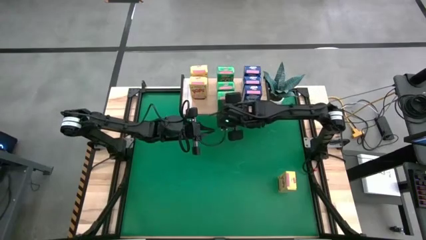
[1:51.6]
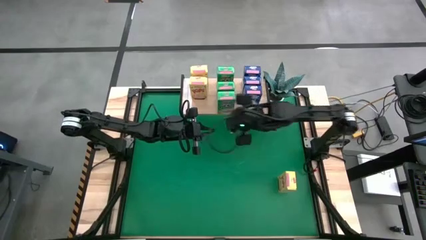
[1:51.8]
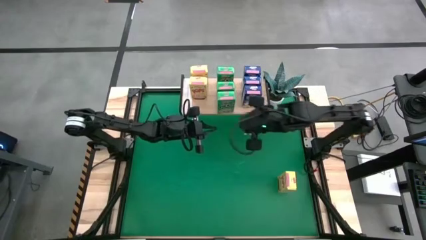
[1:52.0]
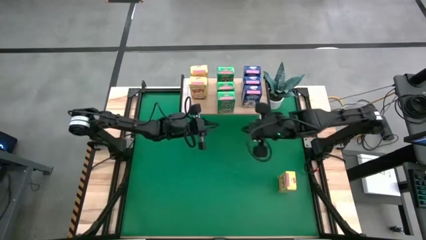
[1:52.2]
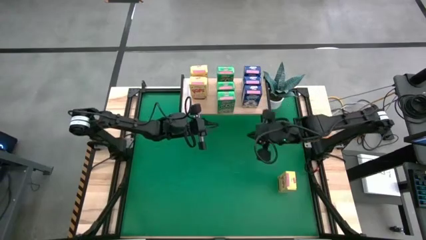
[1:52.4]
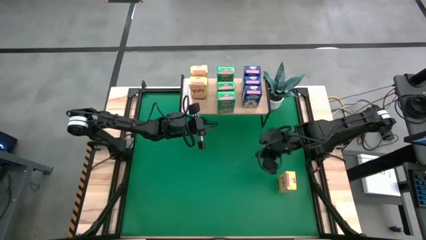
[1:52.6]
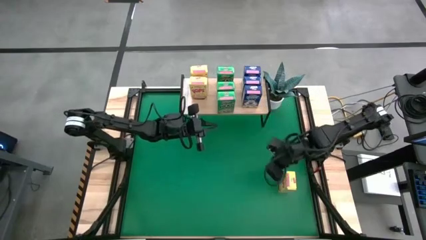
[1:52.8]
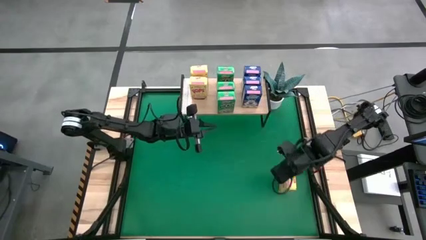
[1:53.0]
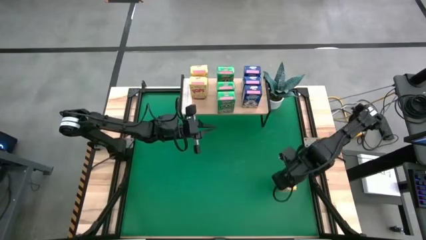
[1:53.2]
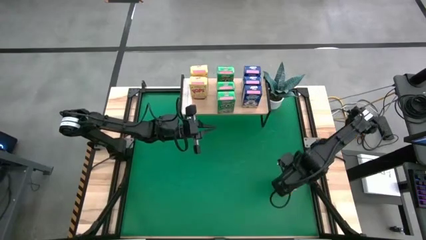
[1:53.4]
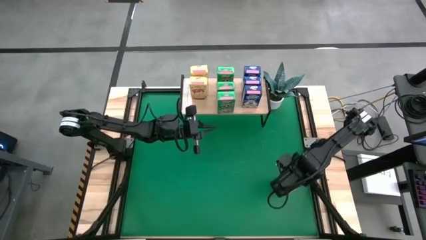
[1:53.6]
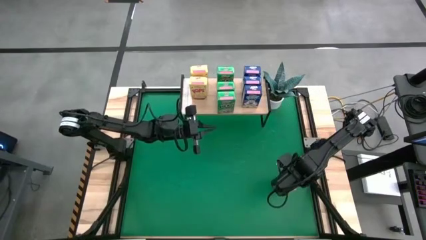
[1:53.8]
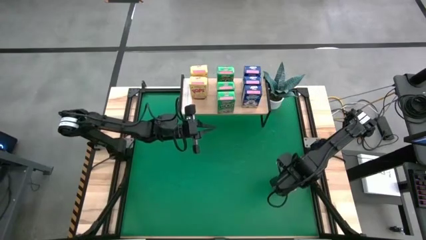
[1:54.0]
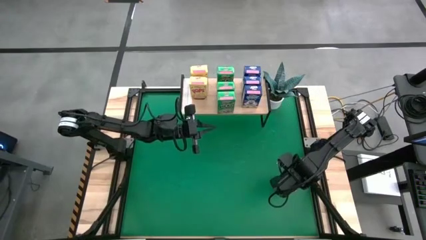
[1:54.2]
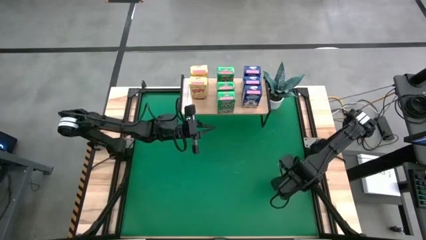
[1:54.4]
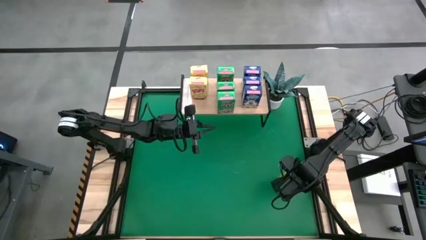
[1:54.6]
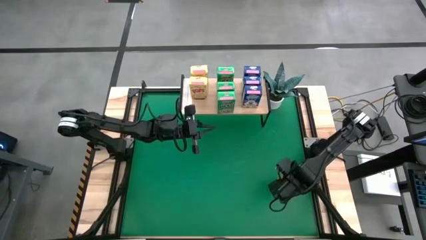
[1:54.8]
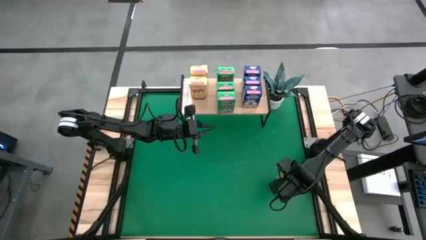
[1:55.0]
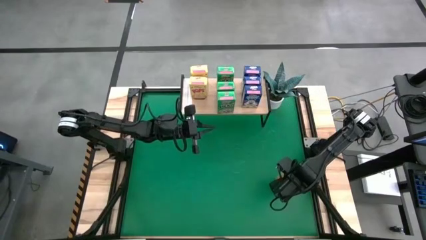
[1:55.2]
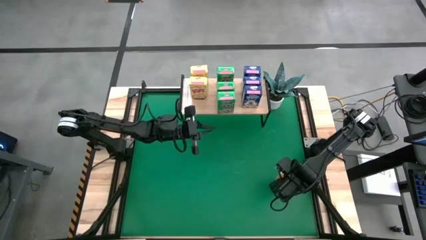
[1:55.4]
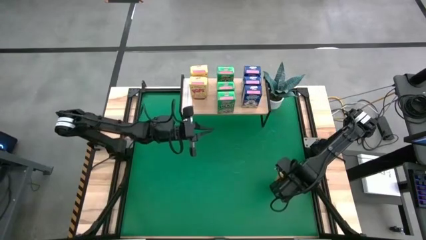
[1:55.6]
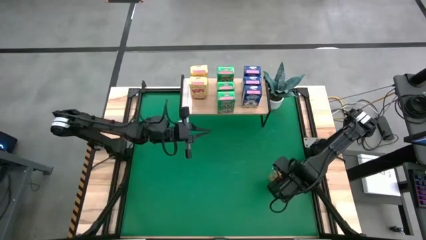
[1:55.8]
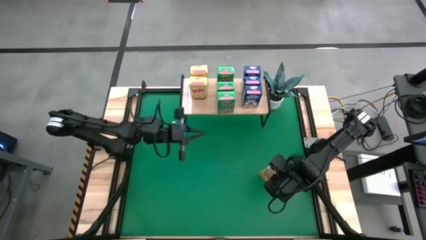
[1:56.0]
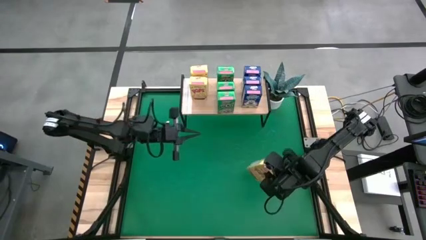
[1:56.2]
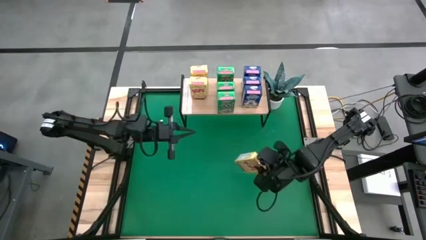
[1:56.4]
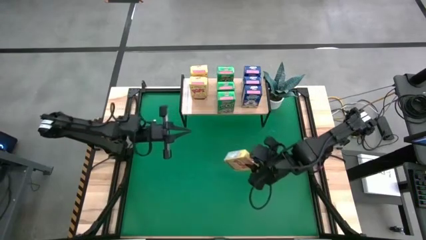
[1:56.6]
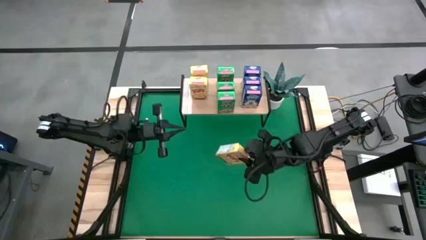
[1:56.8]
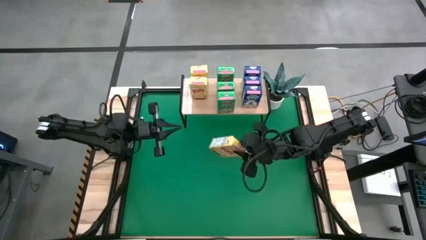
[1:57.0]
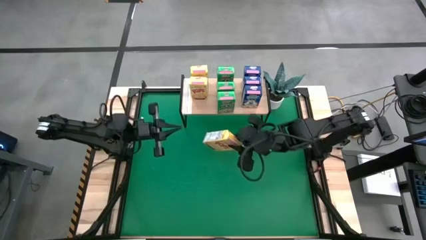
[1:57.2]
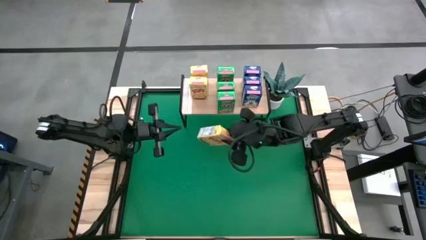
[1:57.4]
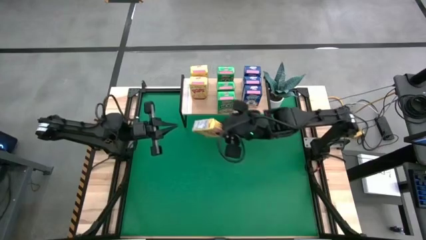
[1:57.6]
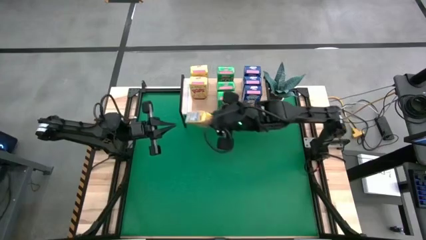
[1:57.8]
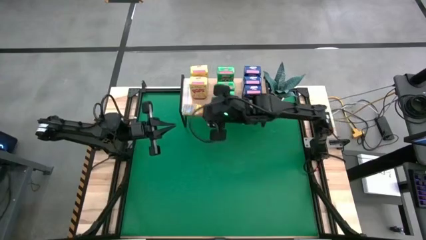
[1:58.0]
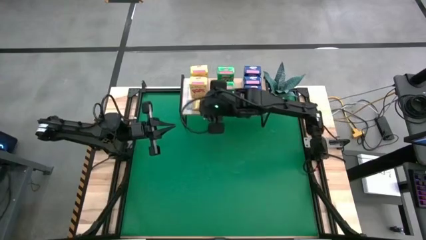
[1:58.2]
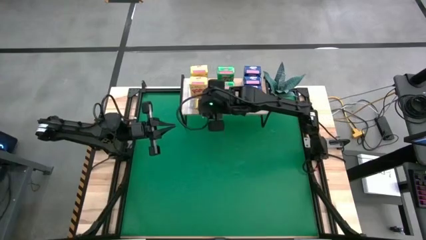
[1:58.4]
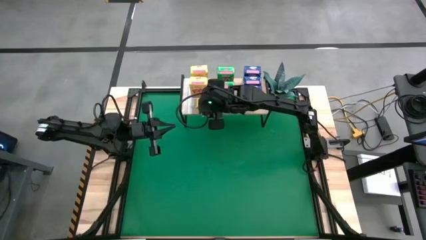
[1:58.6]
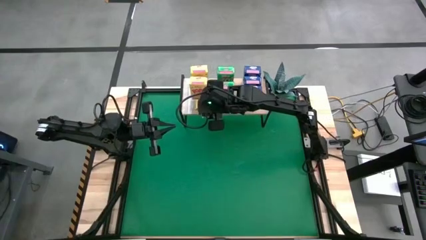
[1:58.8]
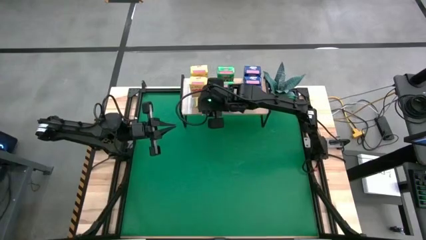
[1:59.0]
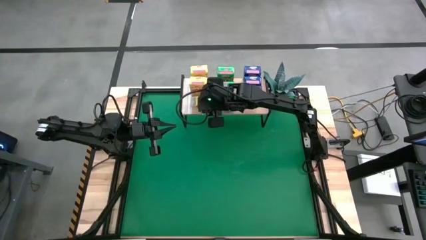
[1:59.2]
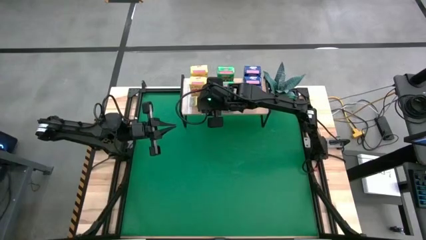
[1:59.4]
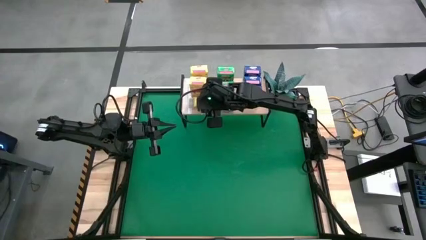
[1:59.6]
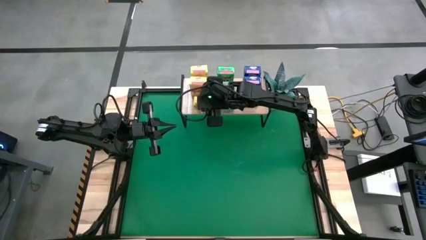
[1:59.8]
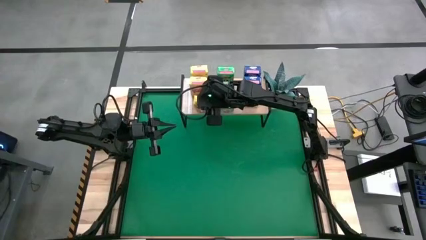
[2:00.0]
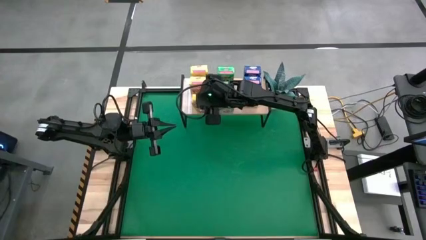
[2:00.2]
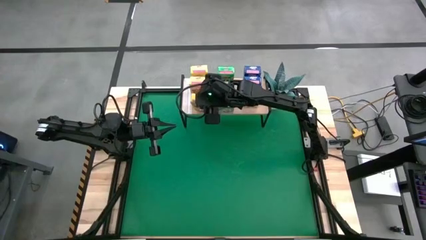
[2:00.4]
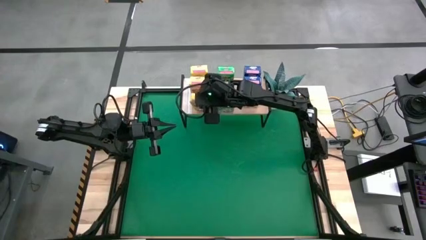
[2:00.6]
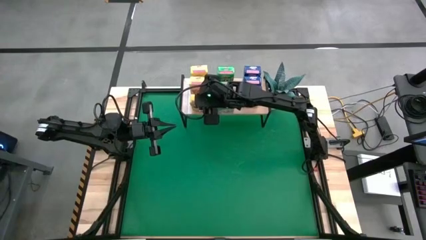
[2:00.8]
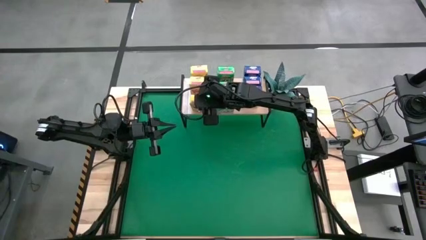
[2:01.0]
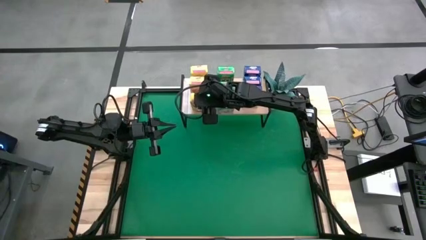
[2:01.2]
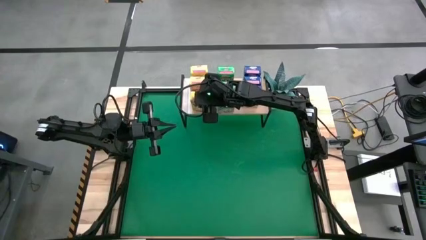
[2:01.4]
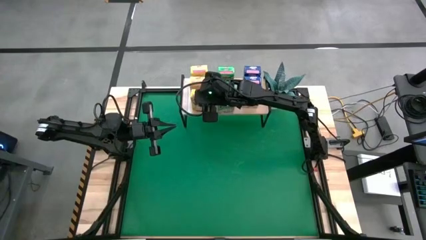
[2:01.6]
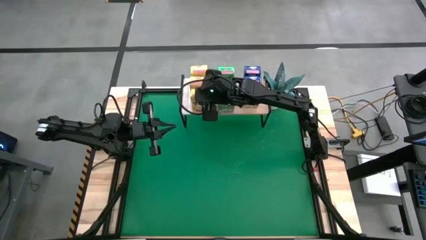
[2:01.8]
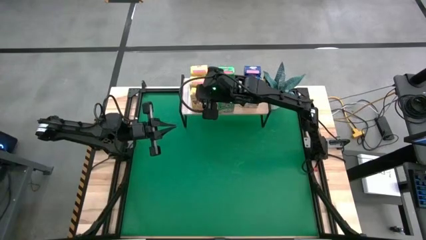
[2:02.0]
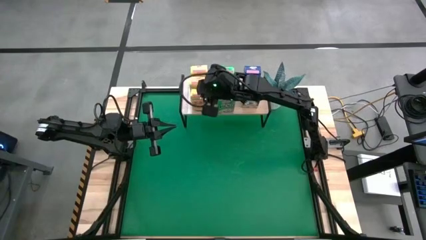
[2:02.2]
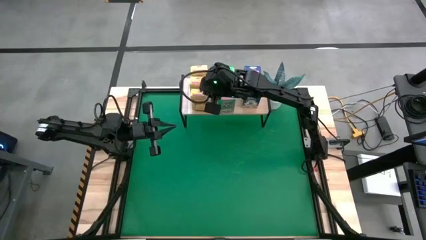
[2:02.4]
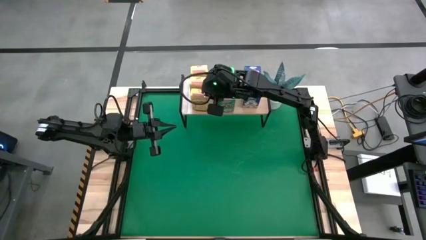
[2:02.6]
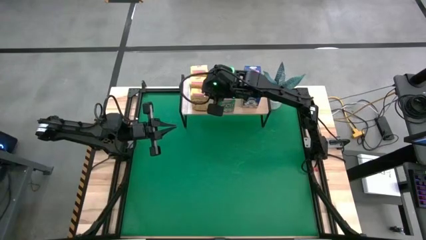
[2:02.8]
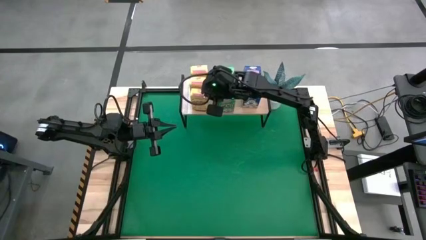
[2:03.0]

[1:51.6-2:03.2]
Task: Stack cereal on shelf
Put the yellow cereal box on the shelf aligned with the other yellow cereal boxes

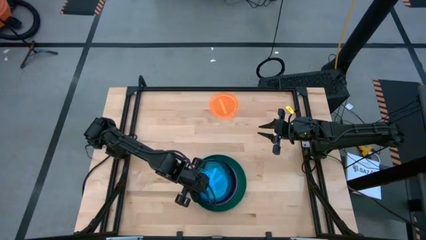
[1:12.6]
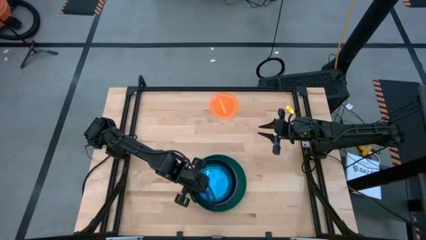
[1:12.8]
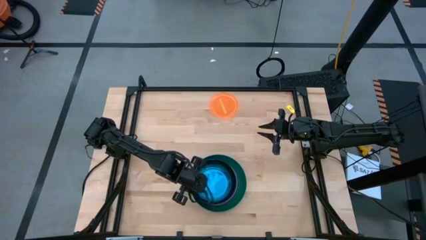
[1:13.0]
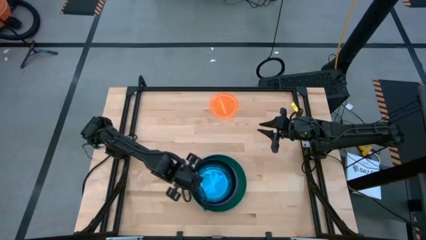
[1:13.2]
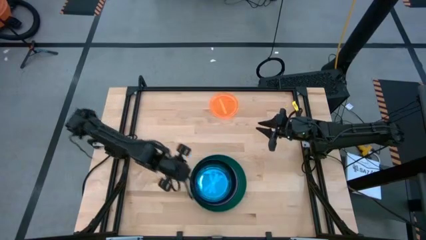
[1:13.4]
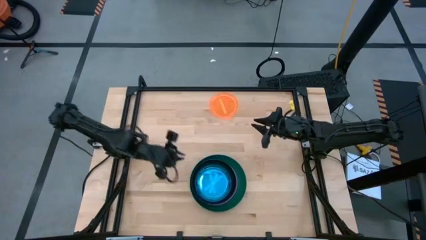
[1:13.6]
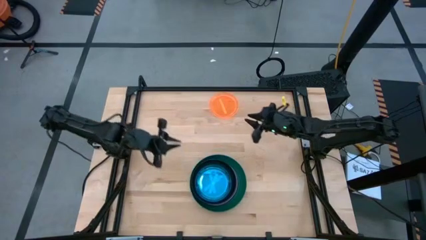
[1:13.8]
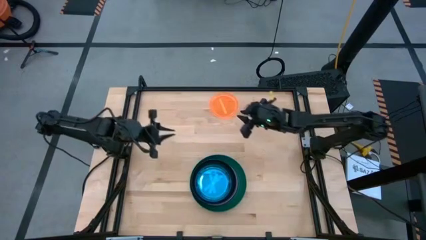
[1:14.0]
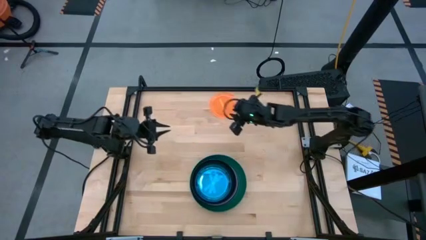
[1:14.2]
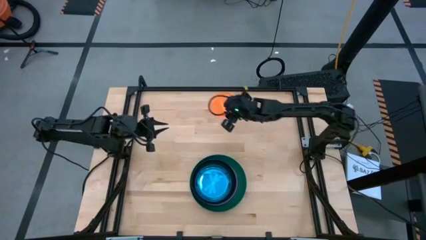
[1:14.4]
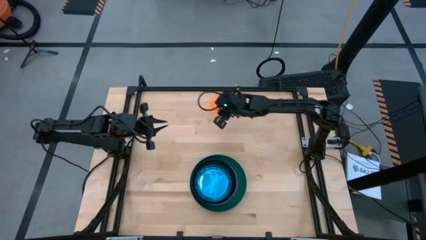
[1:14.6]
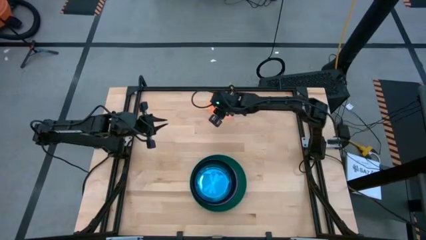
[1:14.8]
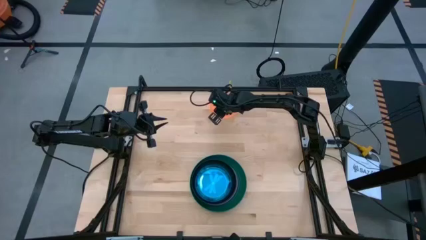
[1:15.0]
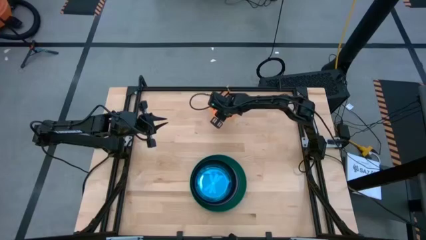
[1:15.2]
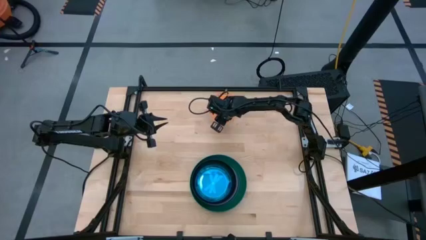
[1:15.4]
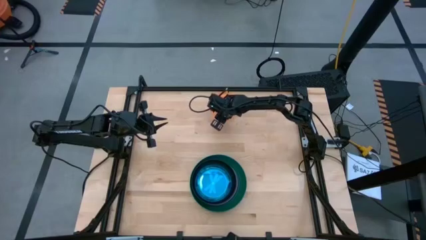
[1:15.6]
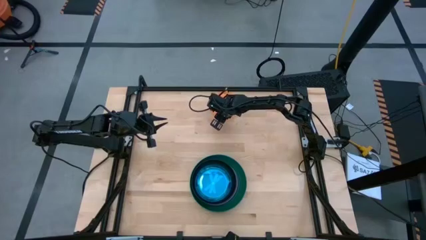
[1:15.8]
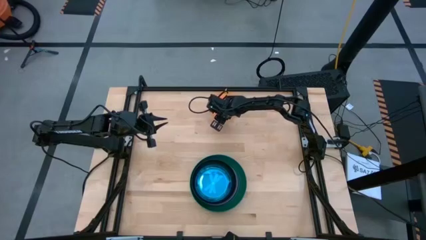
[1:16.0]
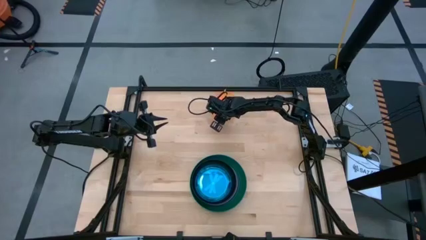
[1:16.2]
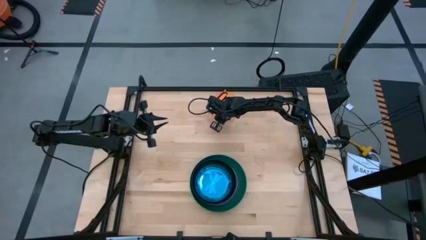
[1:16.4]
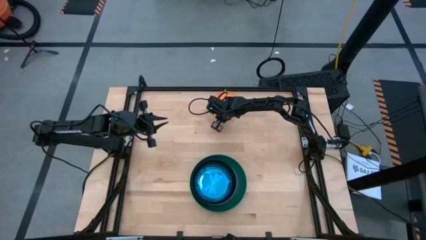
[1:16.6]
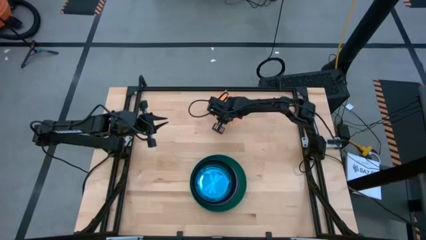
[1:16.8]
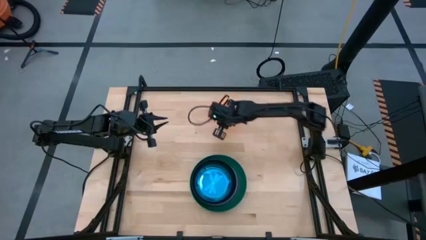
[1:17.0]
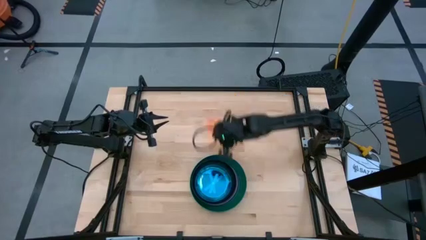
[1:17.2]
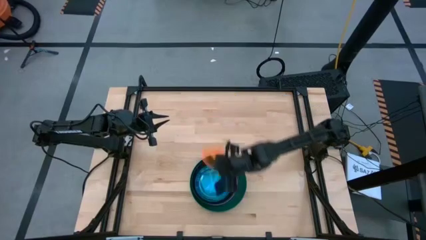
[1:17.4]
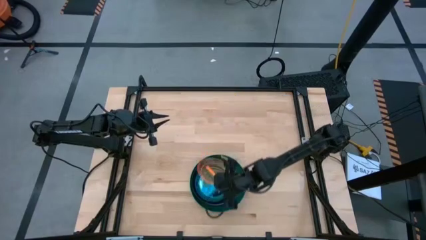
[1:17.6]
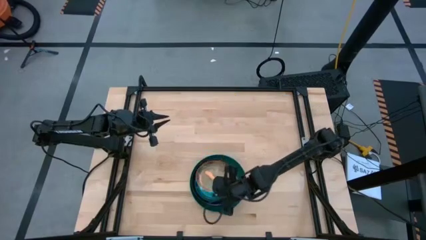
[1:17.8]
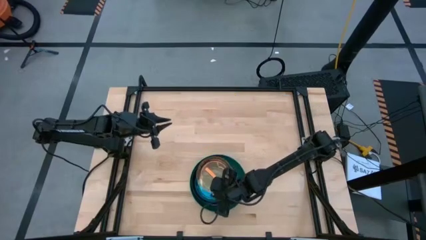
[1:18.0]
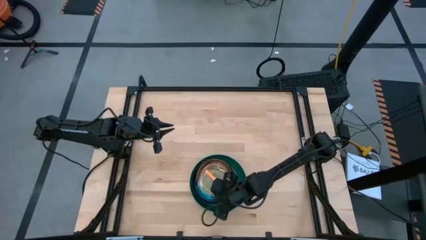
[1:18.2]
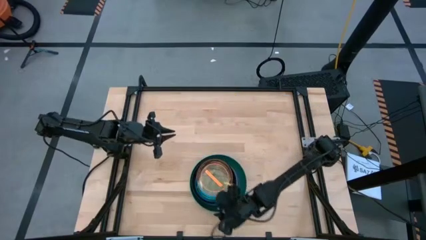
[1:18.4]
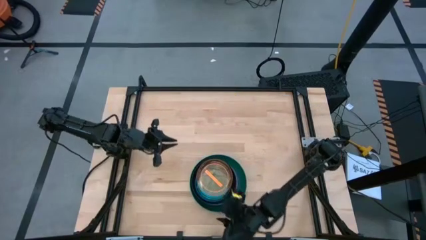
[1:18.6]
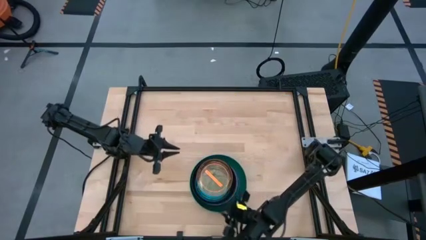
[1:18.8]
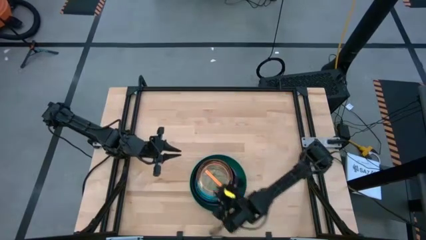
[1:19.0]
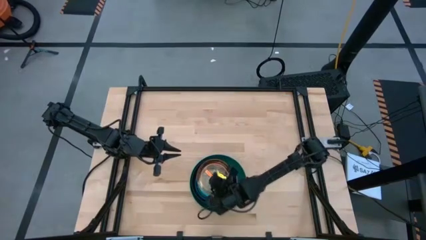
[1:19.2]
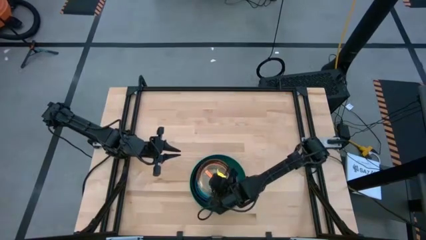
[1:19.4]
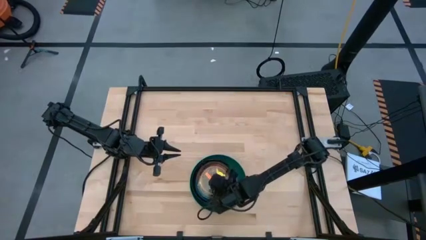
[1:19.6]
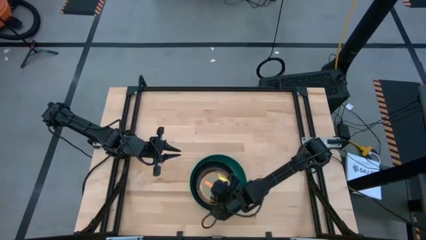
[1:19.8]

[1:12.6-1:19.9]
Task: Stack plastic plates
Stack the orange plate on top of the blue plate
